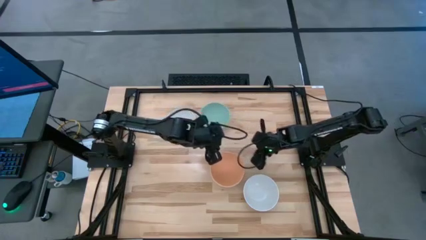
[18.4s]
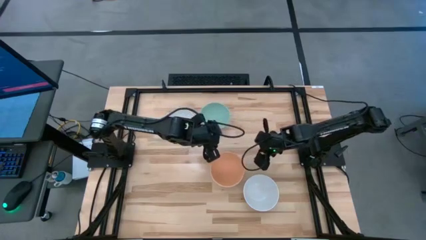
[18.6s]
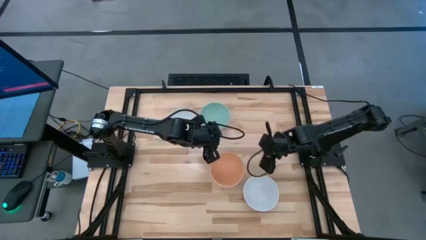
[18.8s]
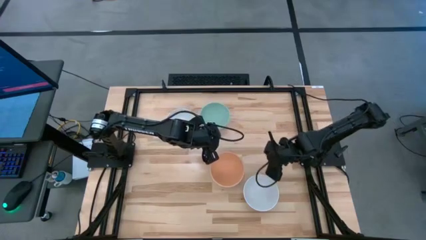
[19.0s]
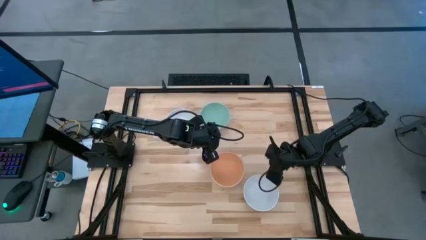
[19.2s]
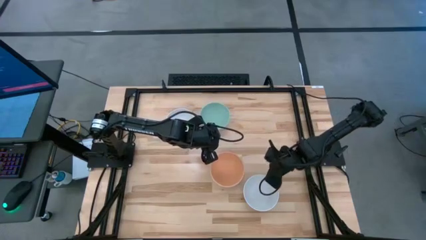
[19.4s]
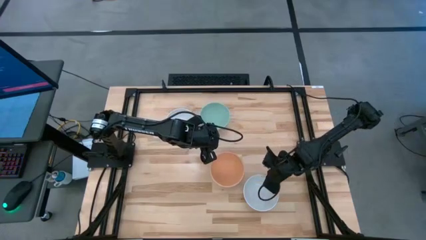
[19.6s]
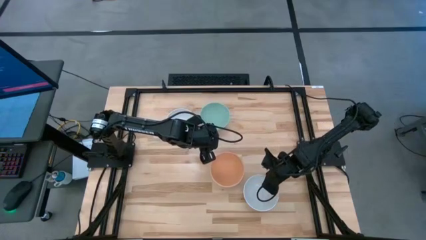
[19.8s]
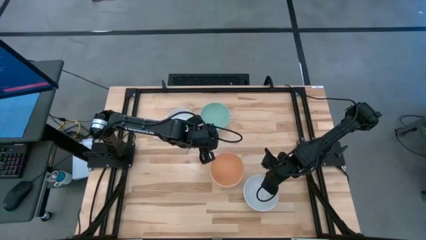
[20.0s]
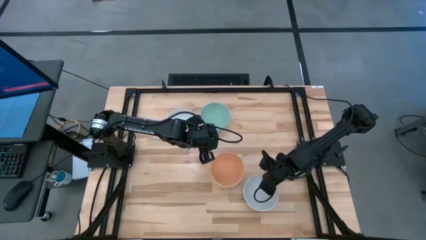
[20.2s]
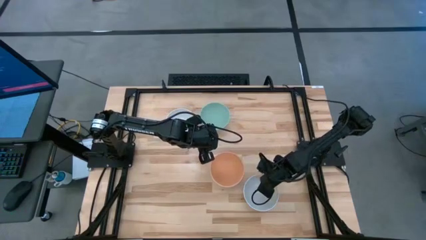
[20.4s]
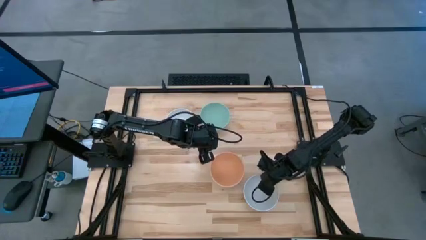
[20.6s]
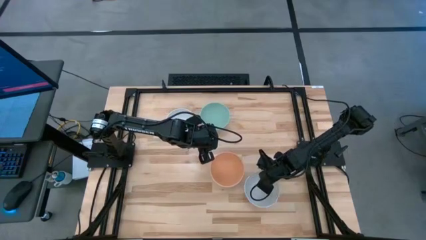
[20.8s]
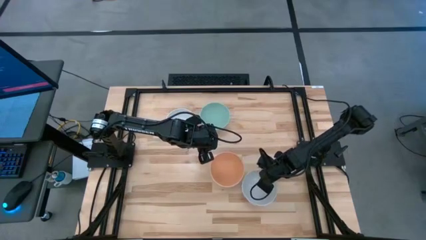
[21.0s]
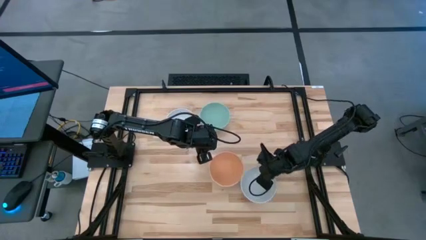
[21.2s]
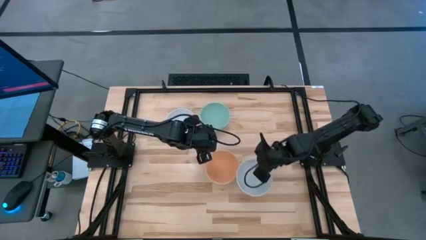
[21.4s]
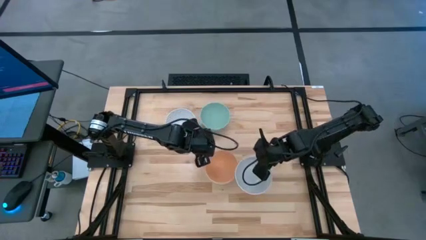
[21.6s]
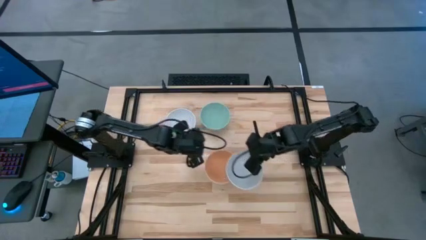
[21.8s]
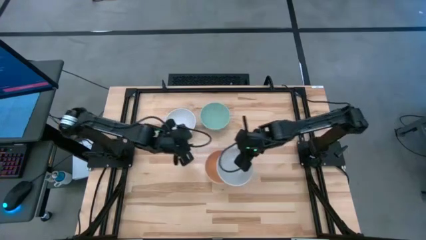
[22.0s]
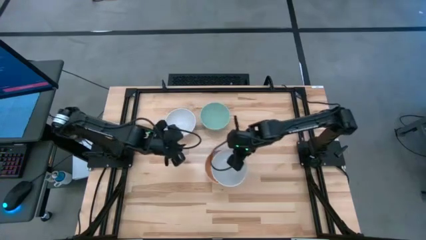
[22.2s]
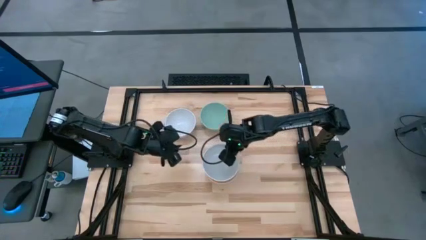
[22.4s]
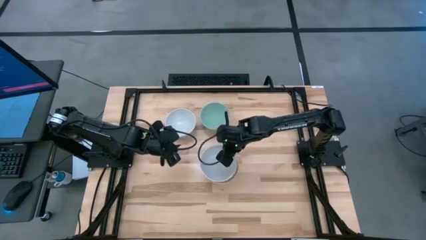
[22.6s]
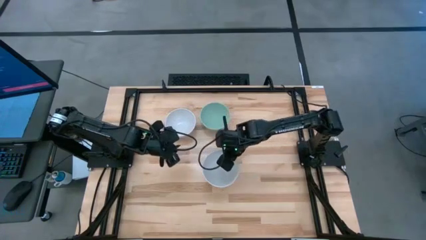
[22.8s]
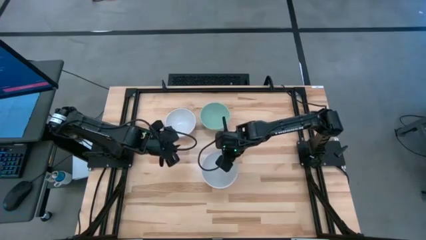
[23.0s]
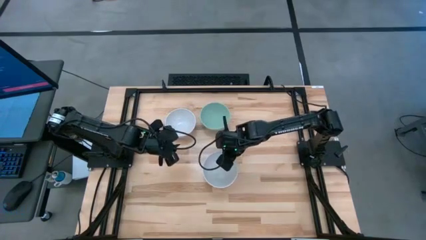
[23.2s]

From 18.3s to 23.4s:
Task: Nest bowls inside each other
Stack the bottom white bowl on top of the orange bowl

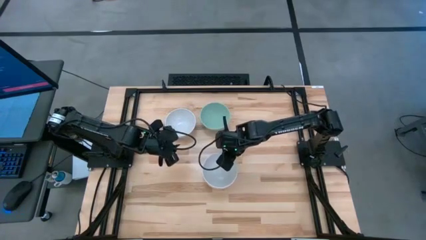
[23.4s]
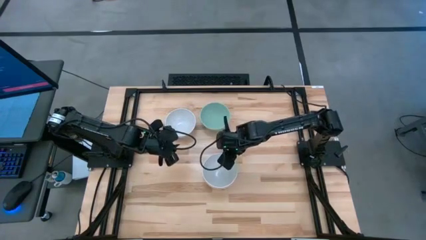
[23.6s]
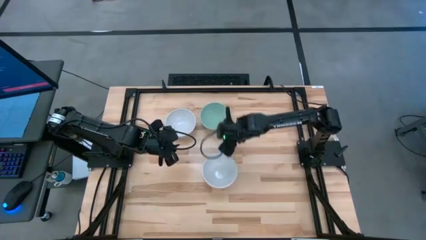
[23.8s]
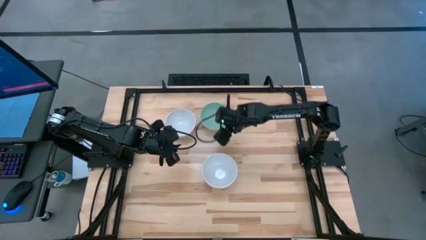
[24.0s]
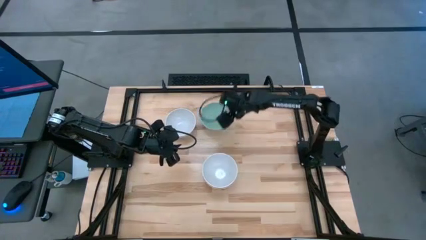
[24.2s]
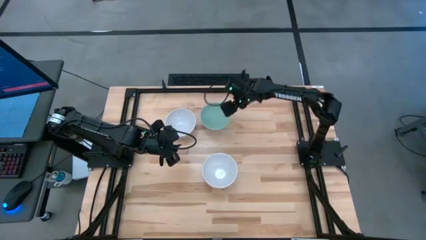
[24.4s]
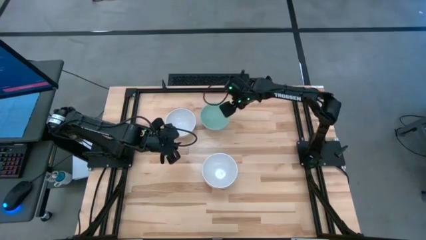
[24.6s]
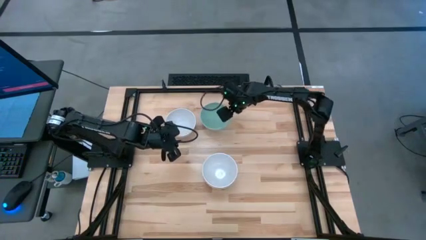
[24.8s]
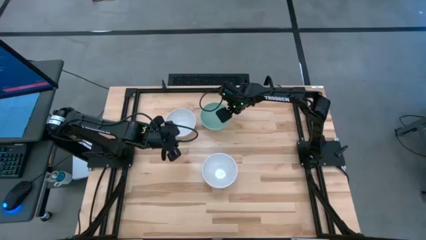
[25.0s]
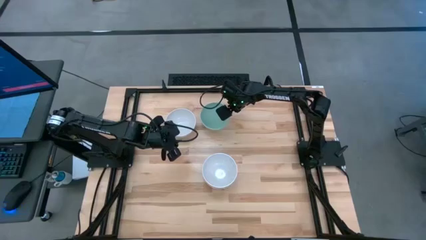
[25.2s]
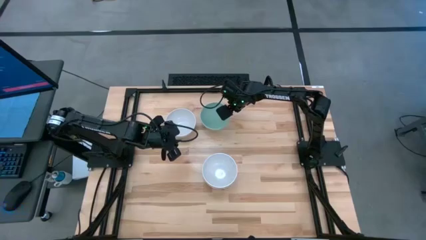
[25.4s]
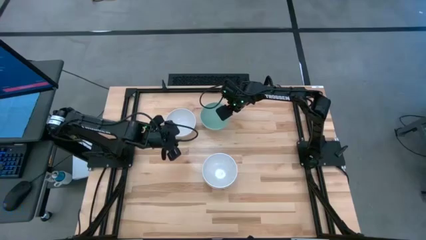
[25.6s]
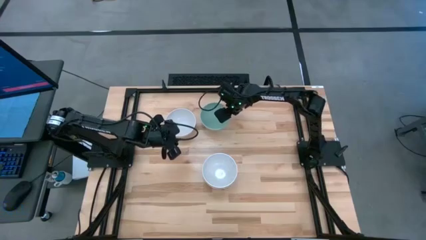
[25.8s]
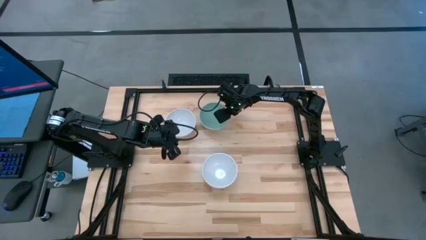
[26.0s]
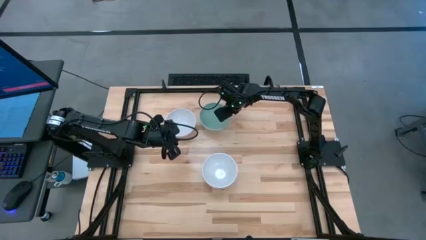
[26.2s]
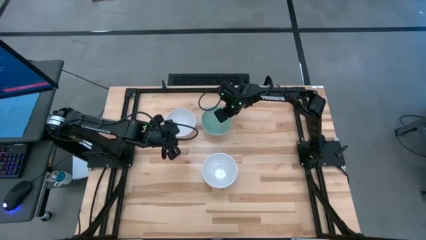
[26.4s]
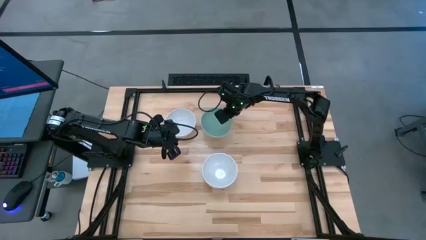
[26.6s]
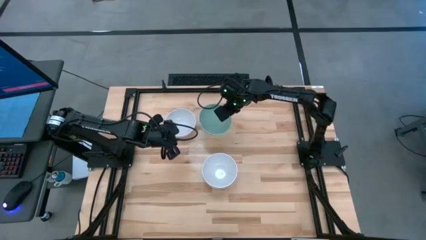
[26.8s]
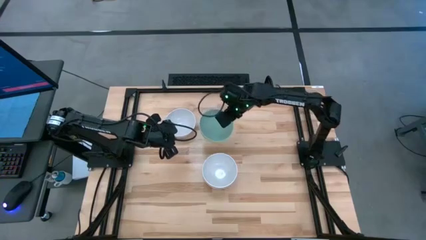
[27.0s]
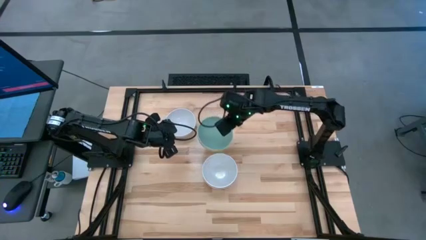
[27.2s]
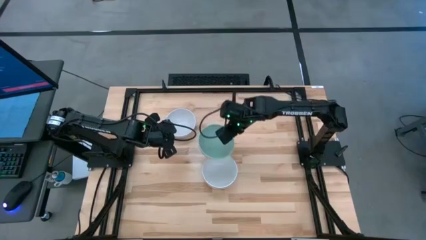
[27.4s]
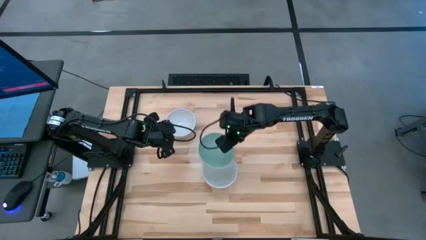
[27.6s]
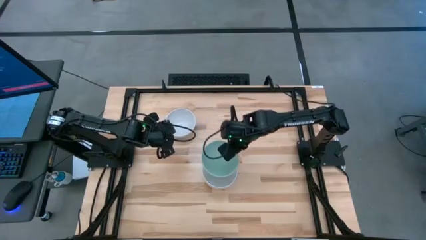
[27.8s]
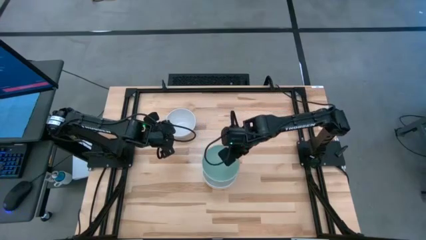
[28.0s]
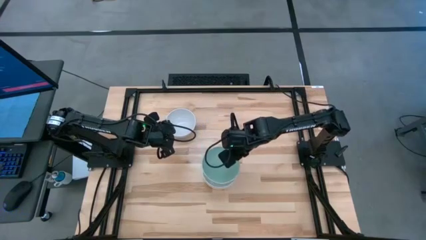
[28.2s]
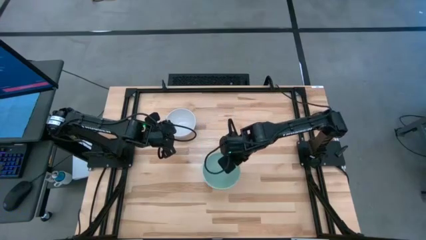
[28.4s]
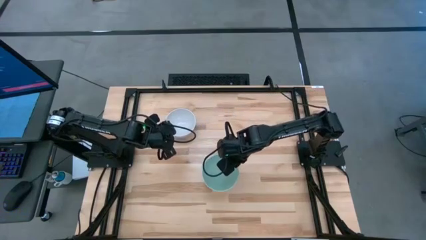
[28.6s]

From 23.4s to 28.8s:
Stack the light blue bowl on top of the white bowl

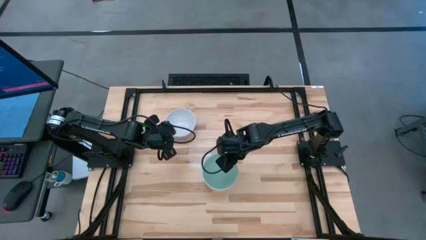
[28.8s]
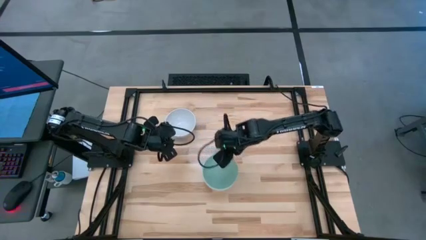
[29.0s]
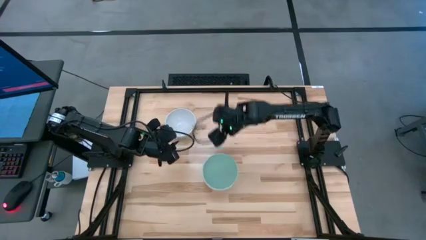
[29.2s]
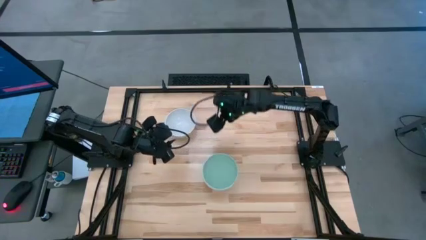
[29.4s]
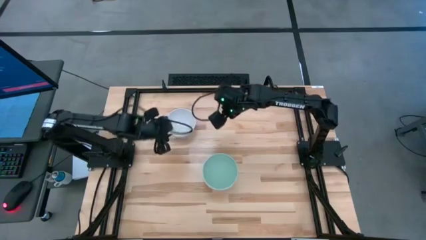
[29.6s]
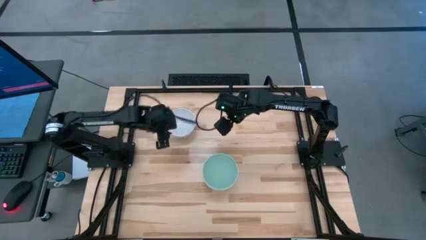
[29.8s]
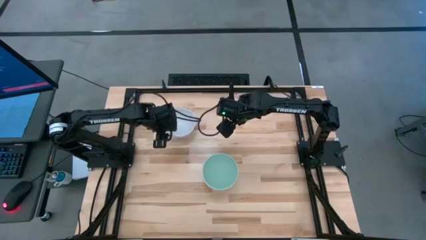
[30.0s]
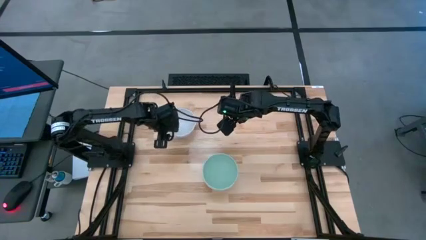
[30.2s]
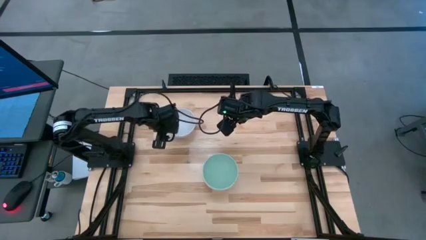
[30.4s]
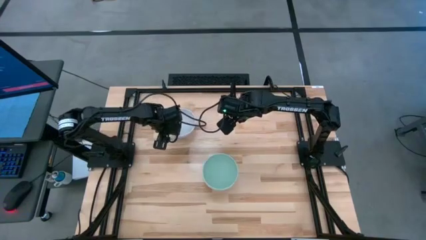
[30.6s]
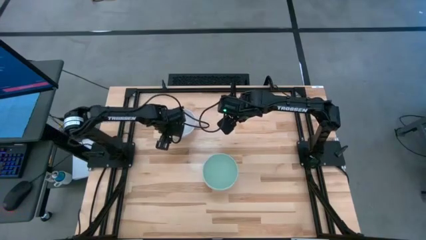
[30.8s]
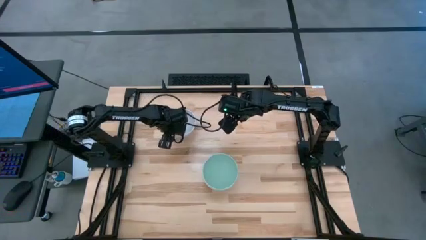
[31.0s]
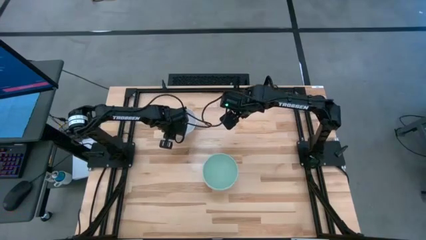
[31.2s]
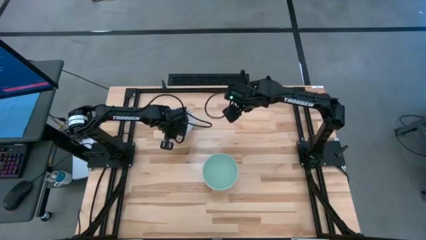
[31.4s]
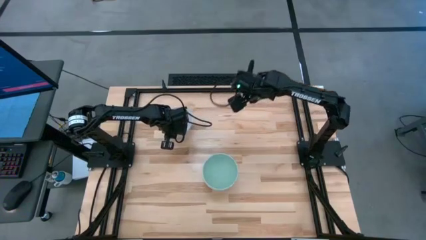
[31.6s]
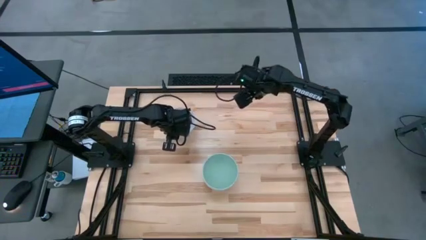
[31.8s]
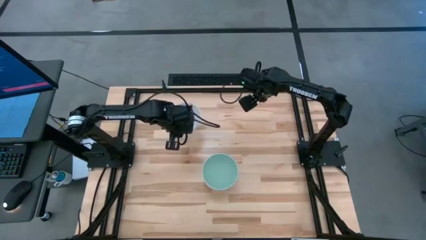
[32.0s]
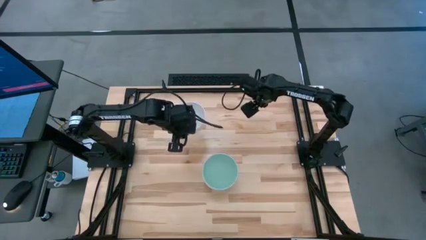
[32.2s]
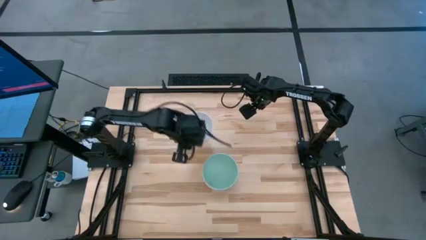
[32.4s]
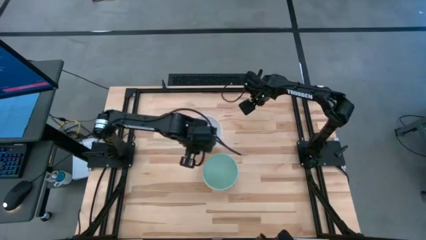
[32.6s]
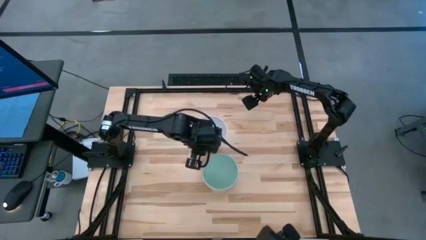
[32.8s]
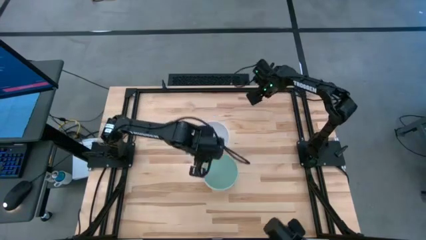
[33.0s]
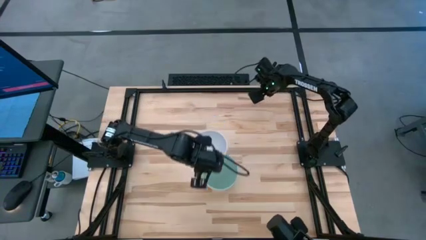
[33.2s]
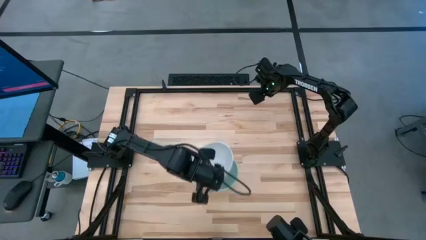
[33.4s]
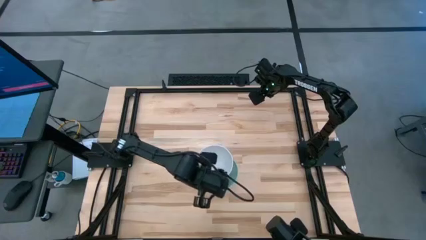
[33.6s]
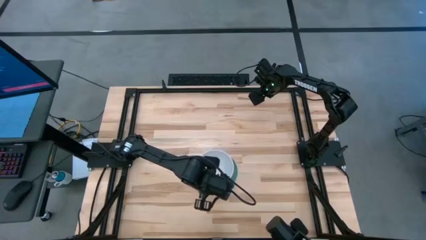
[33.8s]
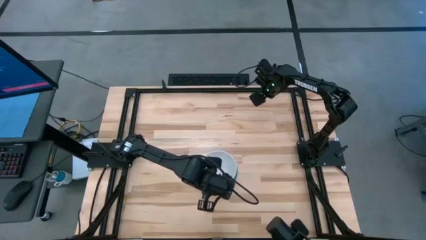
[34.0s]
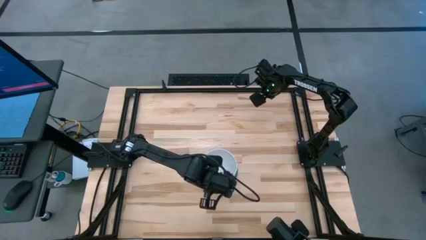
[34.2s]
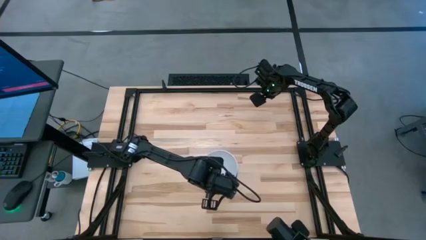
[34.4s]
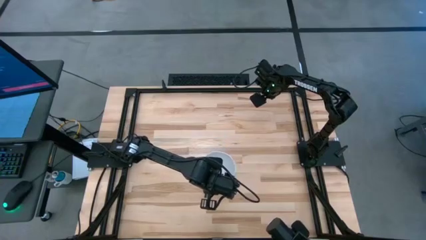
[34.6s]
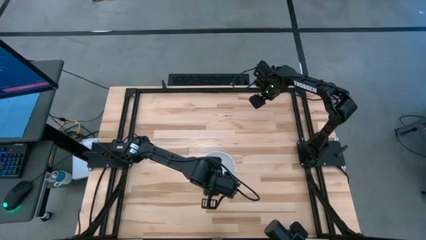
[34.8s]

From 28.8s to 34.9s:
Stack the white bowl on top of the light blue bowl

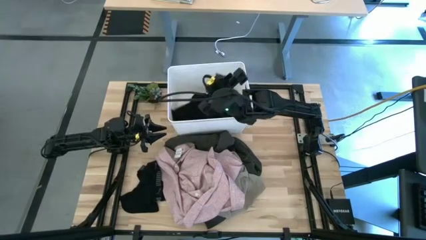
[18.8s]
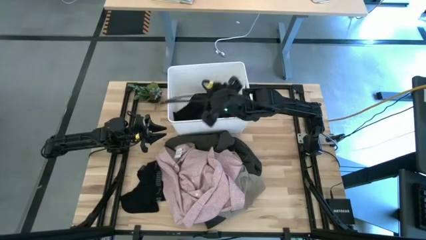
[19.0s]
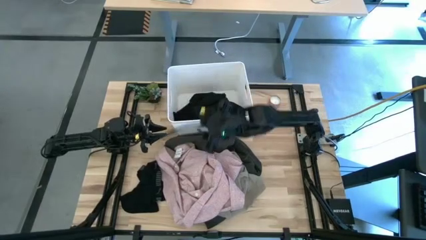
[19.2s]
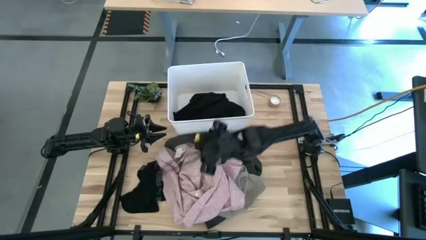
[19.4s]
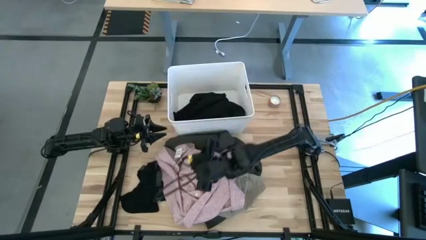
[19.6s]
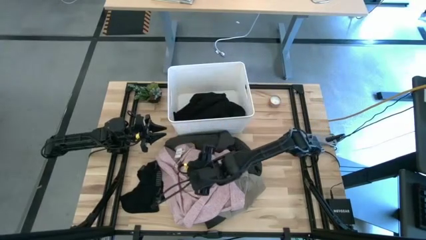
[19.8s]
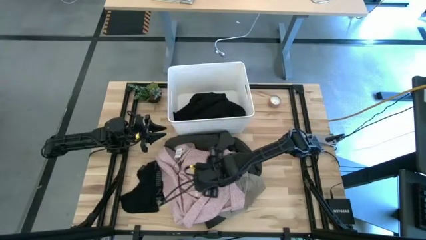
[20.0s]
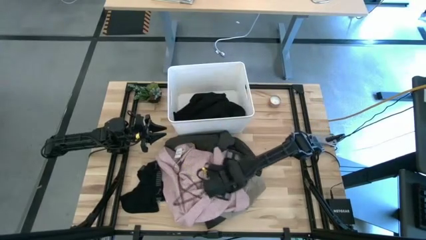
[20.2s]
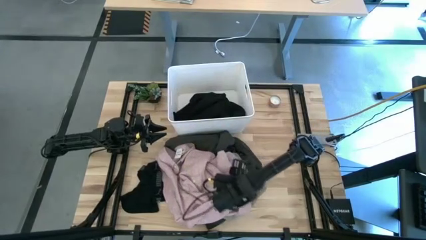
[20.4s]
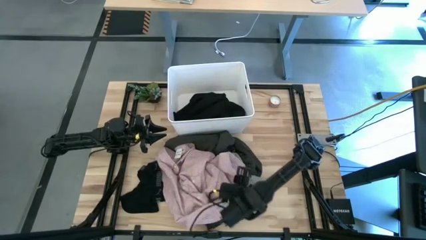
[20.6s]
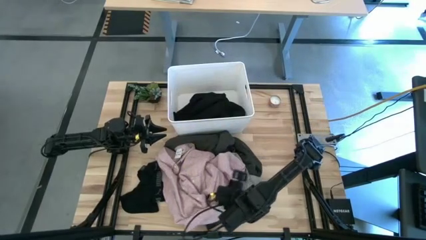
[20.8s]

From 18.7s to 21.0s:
Task: Sort clothes
Adjust the pink shirt
